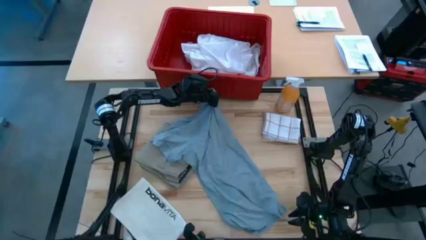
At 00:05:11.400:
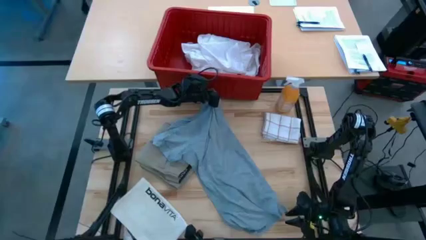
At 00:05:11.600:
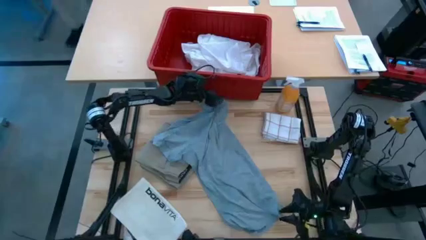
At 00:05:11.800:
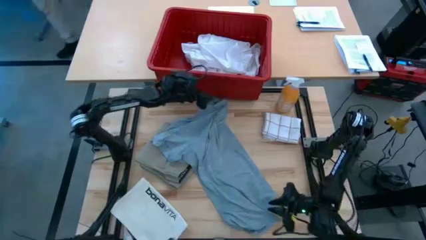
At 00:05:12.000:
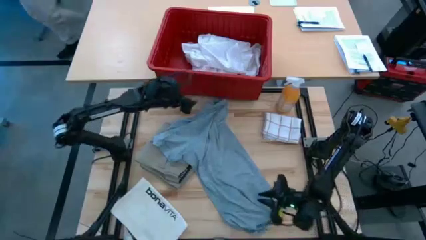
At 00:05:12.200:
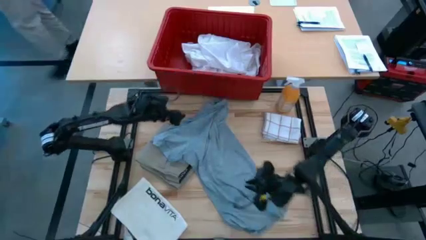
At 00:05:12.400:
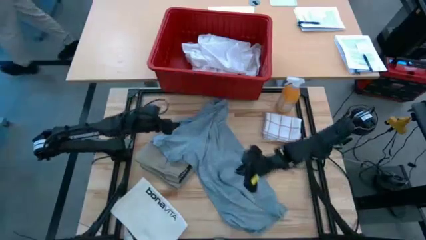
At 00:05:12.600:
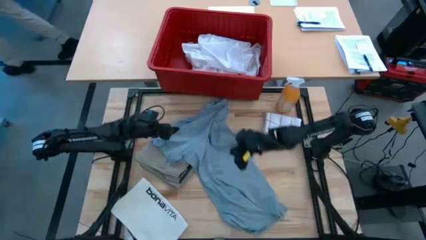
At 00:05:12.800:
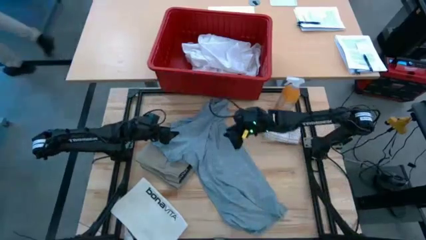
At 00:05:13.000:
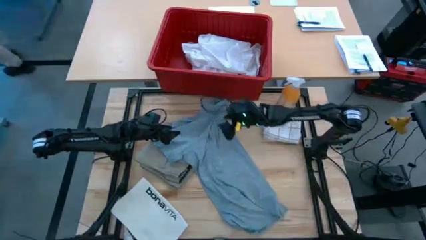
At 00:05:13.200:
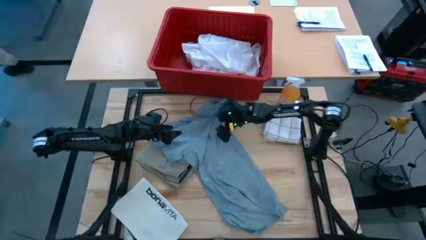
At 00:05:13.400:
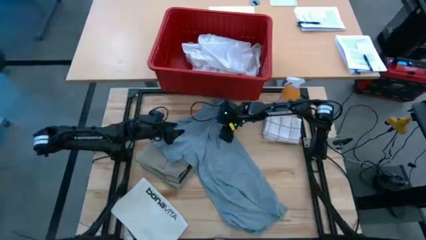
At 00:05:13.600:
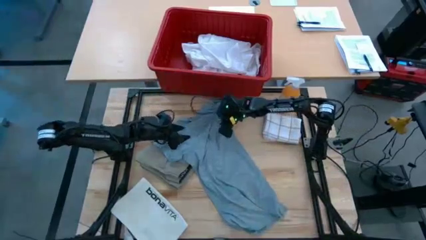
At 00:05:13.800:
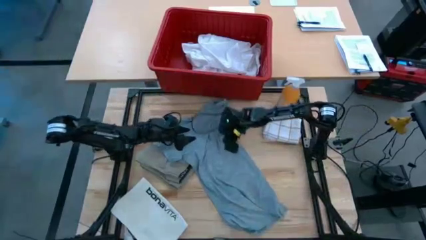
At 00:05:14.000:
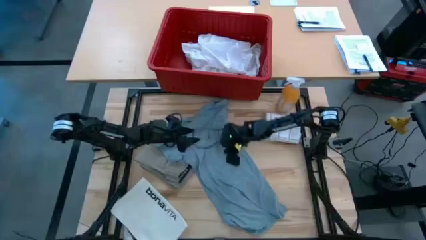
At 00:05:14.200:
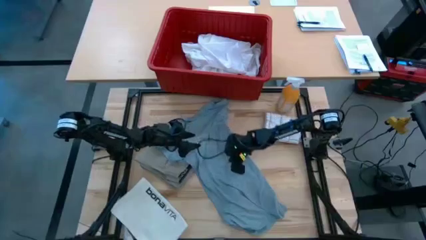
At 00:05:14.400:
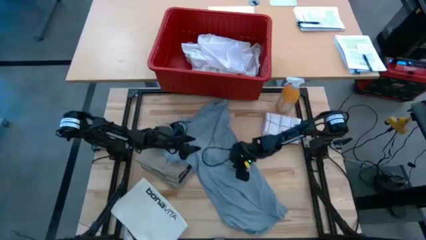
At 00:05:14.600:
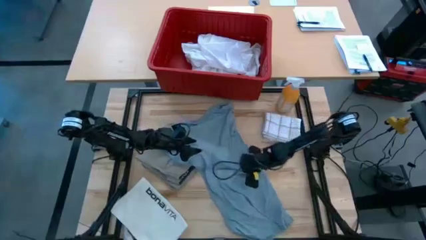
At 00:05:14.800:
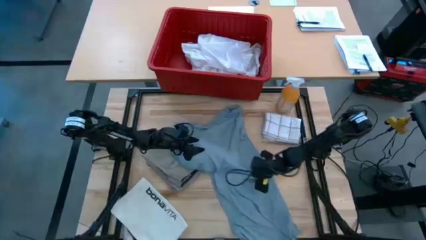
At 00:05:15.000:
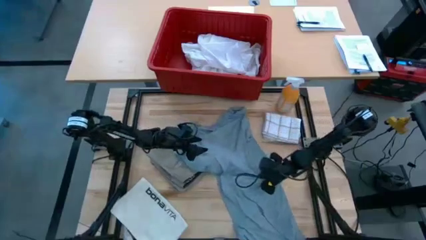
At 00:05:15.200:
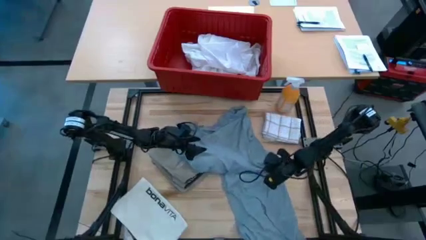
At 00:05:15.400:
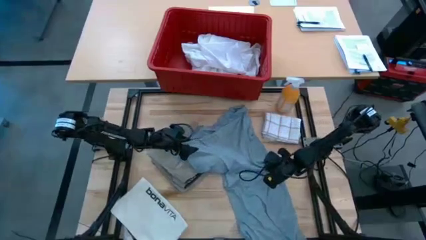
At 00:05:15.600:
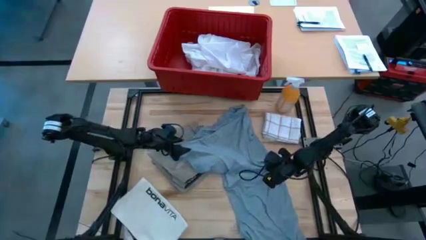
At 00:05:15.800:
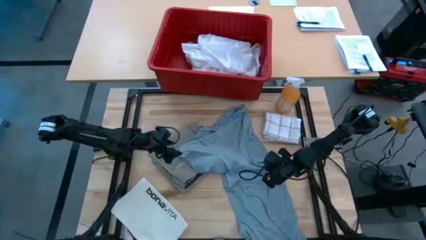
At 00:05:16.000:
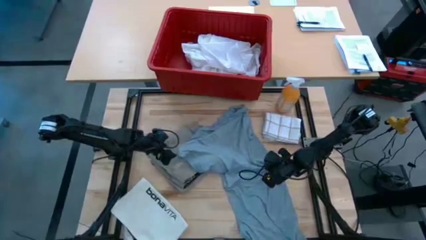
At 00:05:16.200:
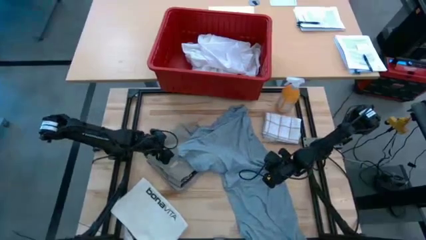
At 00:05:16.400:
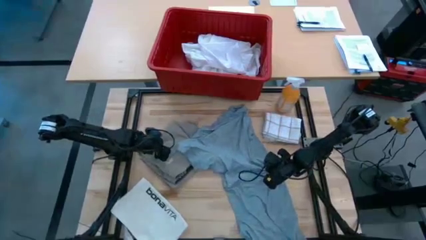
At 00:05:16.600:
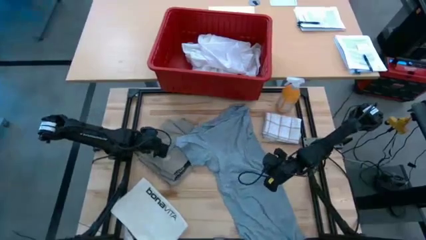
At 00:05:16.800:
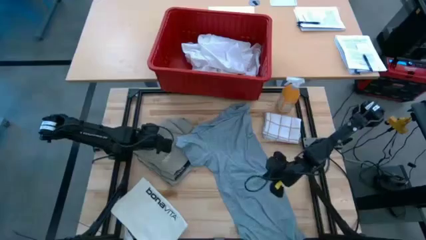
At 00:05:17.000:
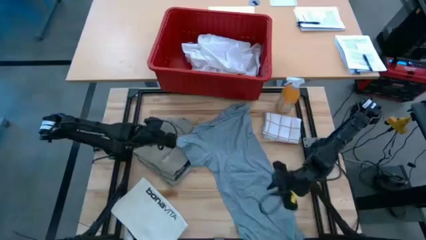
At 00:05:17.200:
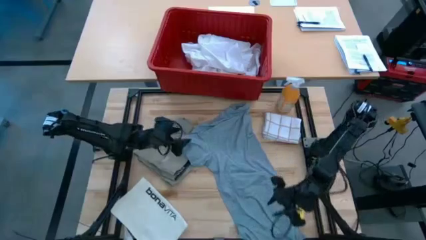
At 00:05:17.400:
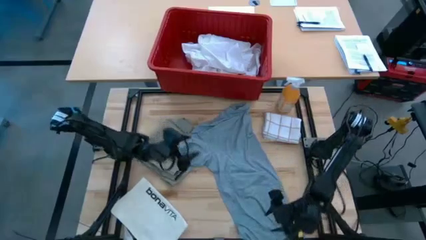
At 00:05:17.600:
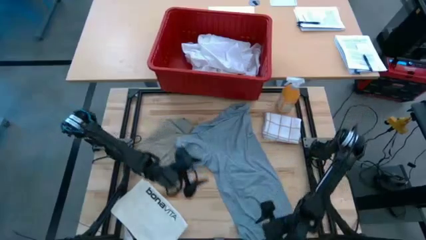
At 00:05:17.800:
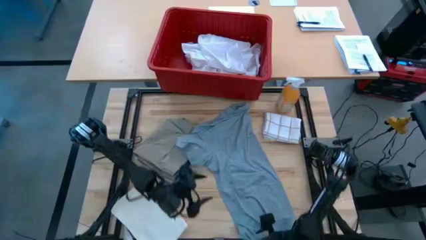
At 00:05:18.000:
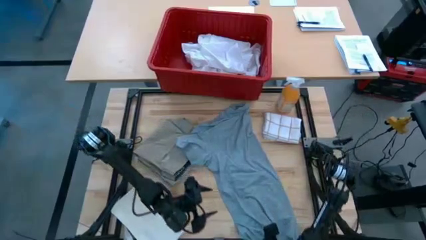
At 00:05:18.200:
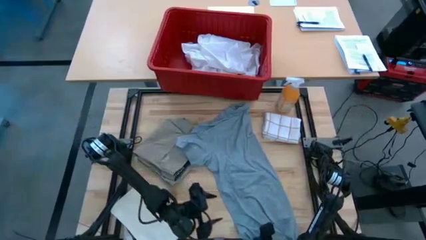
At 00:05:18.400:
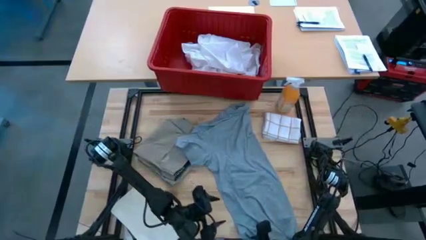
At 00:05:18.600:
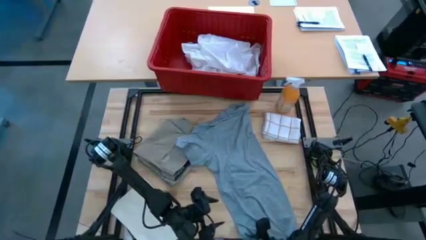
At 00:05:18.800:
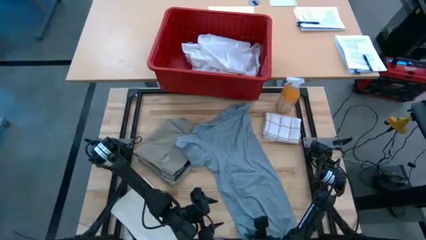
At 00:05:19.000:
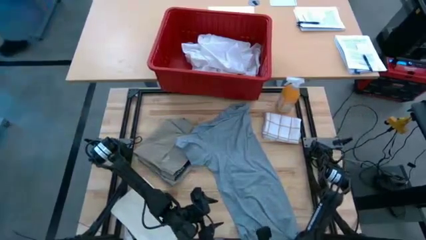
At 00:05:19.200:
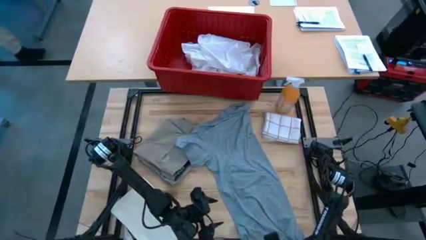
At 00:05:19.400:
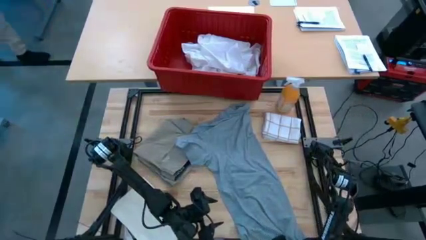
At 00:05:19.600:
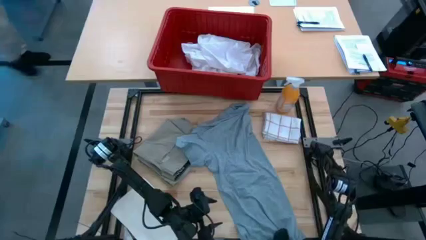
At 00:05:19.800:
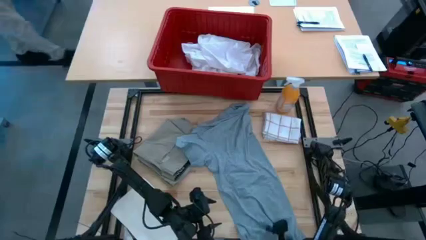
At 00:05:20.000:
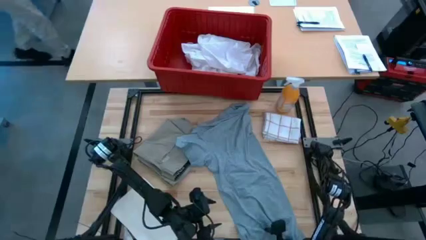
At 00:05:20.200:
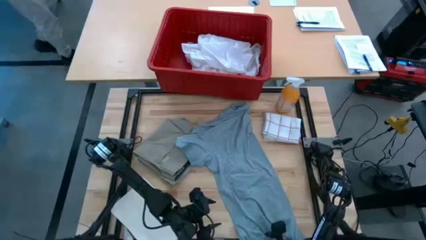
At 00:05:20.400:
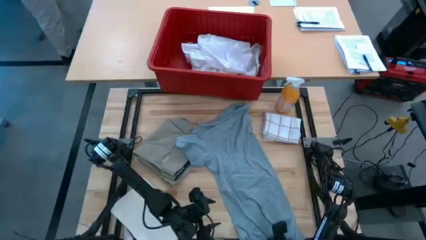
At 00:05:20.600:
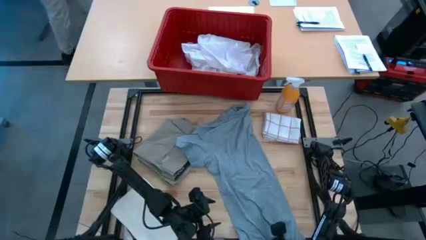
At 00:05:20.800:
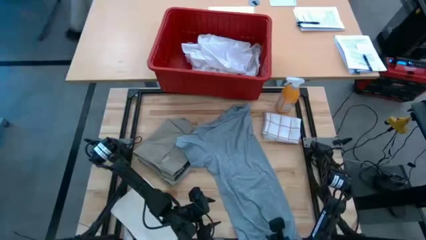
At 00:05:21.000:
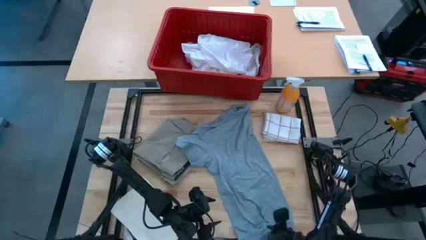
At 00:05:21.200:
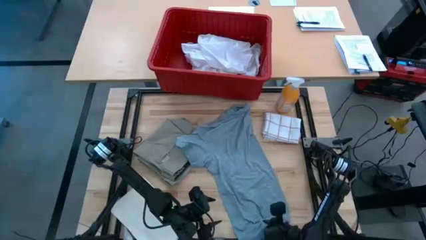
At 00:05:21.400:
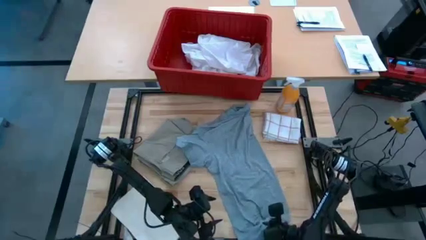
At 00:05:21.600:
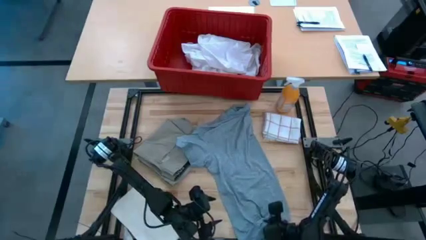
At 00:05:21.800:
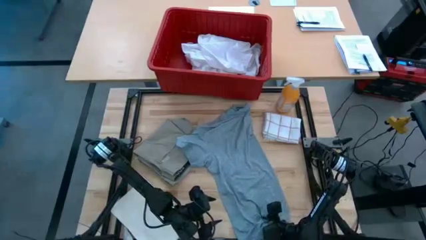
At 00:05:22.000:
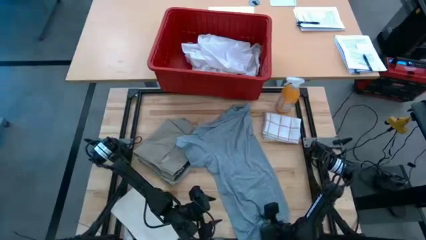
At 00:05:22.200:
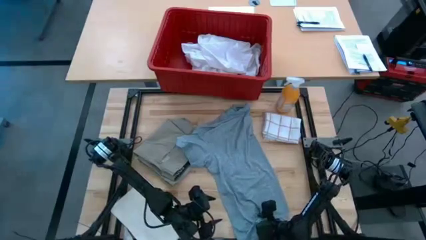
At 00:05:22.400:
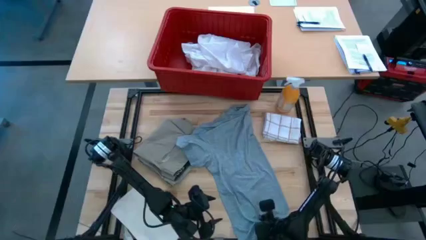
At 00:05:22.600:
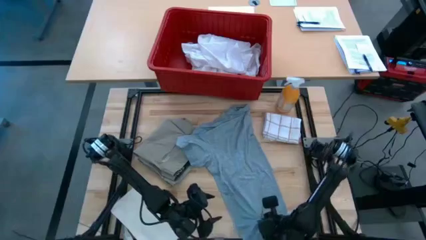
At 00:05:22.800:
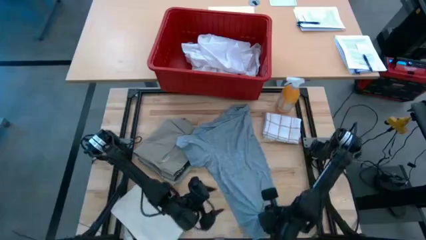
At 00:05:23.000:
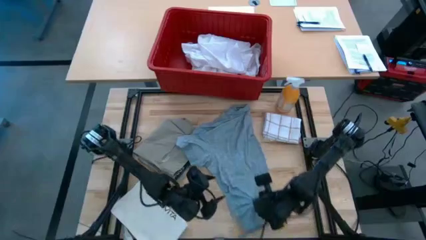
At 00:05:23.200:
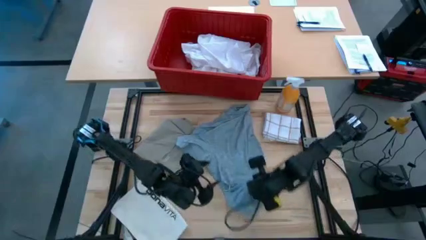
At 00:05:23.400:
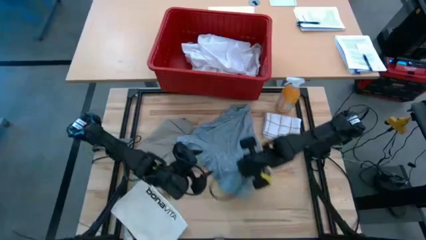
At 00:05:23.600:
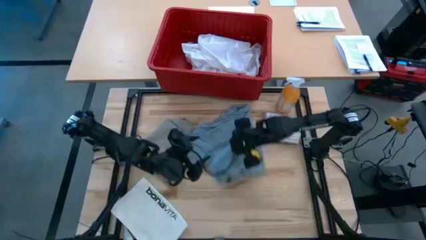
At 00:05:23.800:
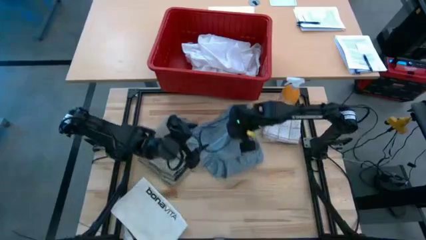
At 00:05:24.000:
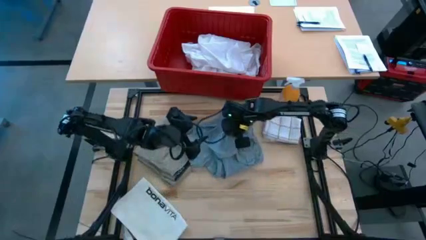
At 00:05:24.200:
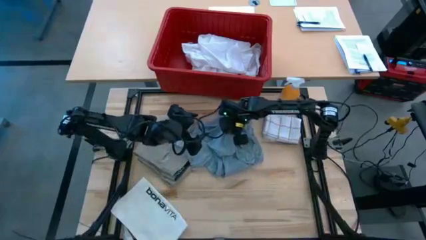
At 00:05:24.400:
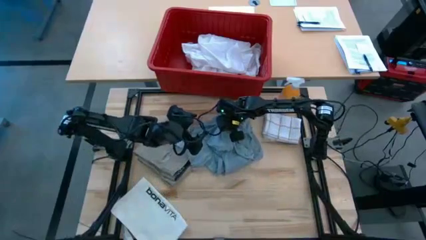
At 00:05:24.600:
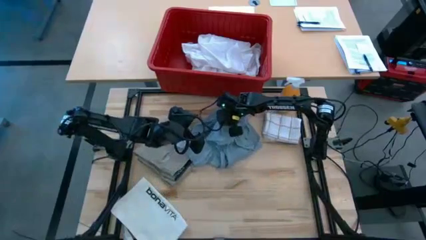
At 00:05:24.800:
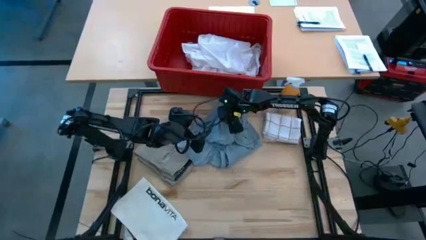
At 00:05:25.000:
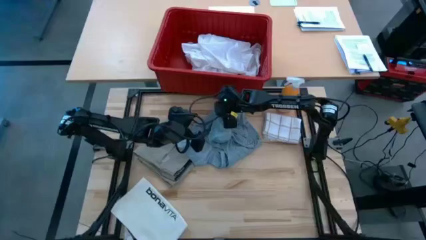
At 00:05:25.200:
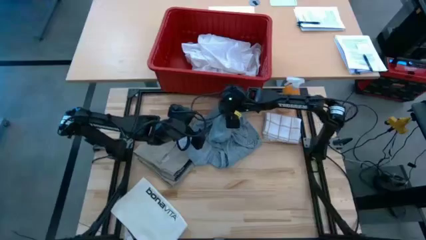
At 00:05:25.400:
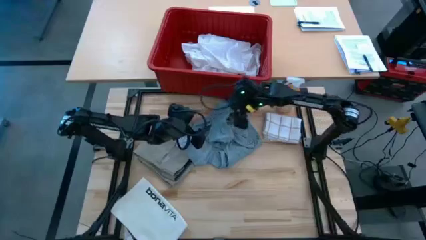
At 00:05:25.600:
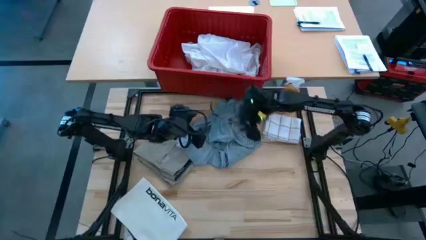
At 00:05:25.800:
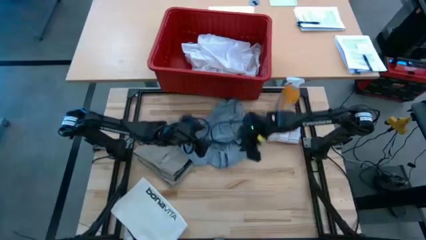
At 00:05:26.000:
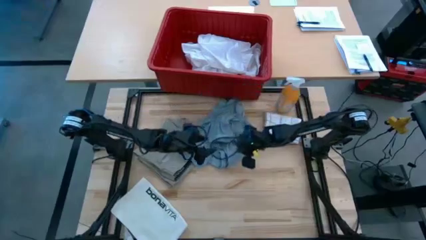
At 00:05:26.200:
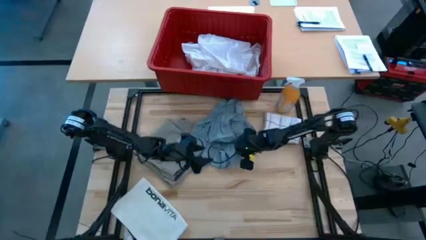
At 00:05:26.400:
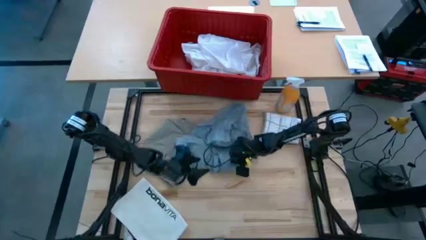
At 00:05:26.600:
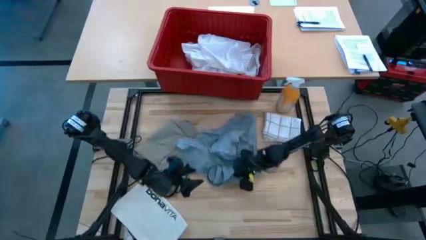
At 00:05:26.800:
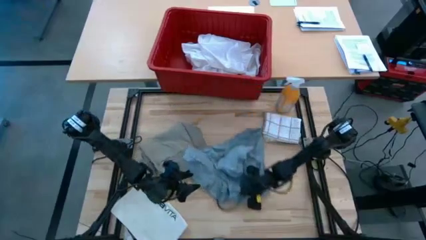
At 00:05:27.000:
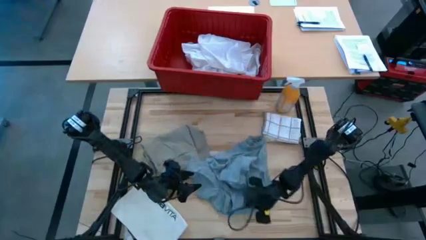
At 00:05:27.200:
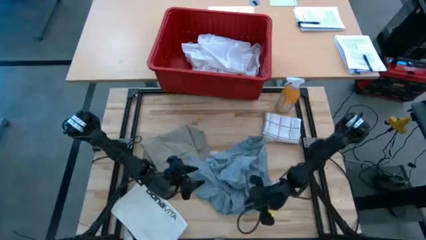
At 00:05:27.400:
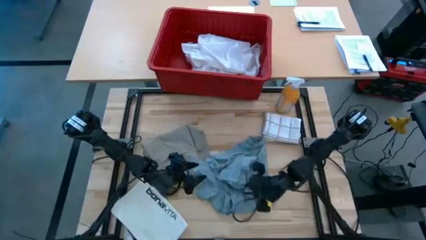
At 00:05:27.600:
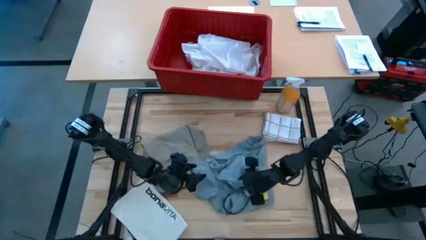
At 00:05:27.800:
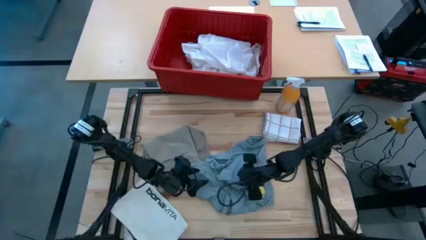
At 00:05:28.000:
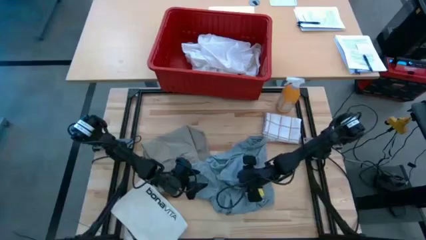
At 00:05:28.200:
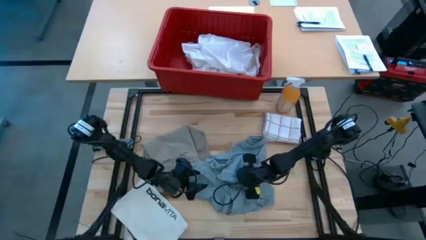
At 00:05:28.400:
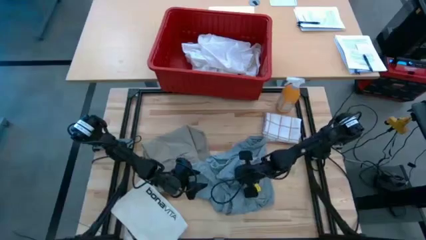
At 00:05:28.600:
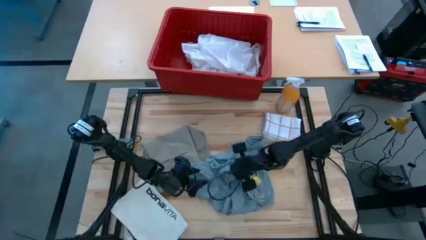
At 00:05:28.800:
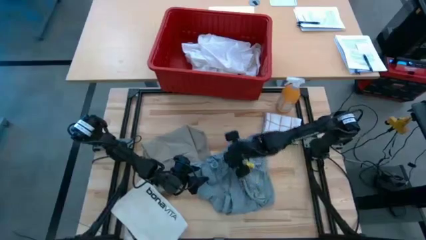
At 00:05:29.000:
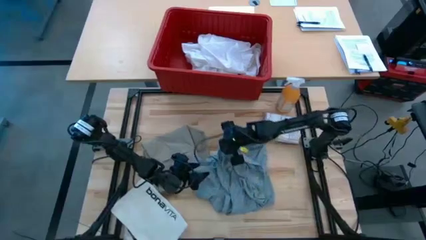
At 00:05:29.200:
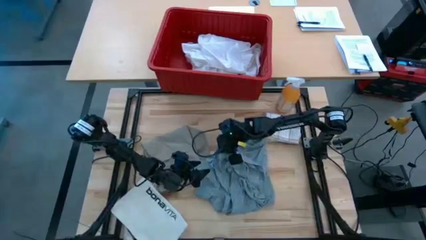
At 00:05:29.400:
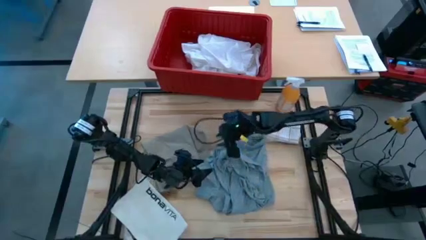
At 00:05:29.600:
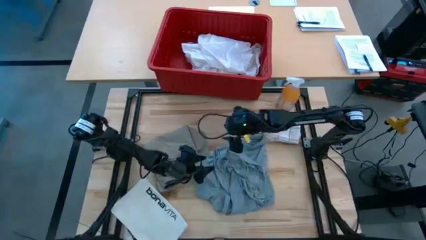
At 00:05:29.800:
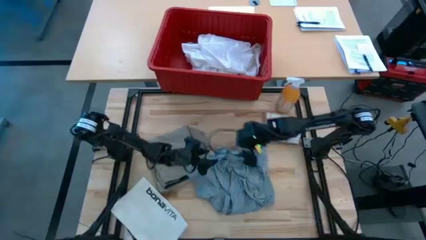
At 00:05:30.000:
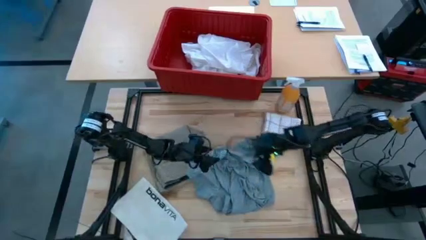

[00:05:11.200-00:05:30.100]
Task: Fold laundry
Fold the gray shirt
